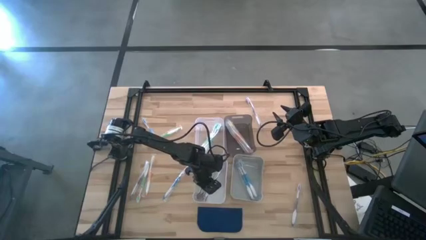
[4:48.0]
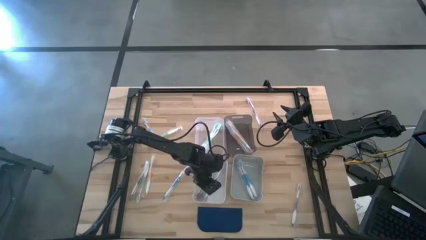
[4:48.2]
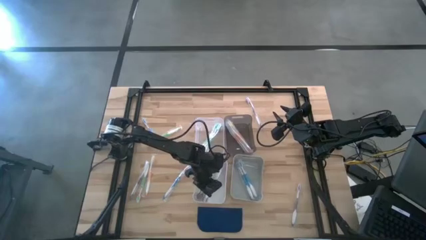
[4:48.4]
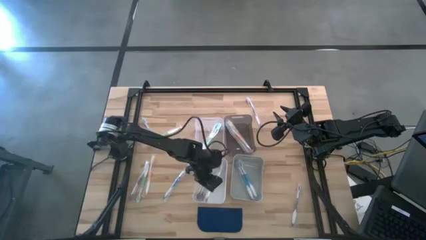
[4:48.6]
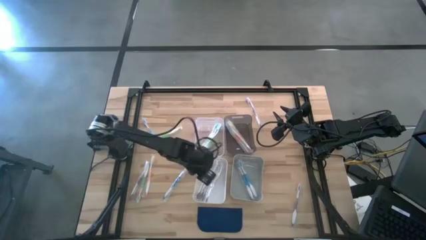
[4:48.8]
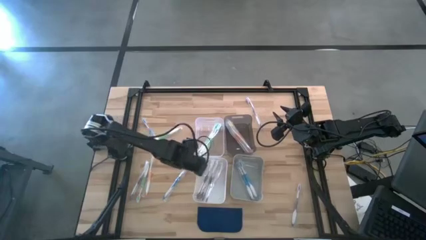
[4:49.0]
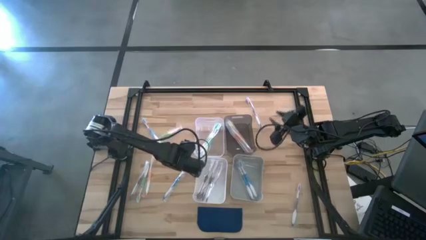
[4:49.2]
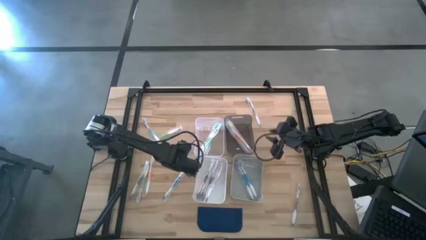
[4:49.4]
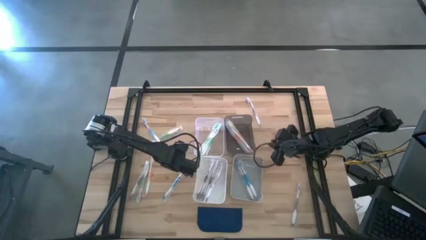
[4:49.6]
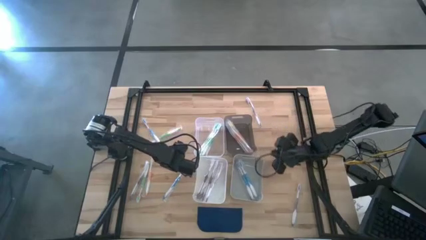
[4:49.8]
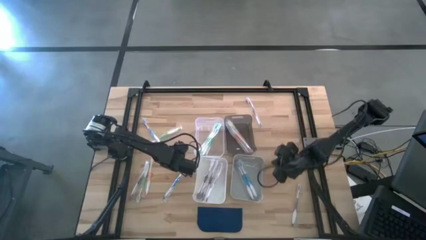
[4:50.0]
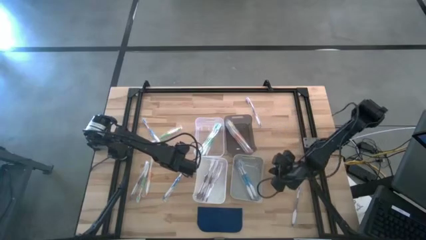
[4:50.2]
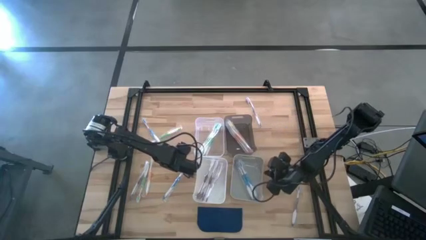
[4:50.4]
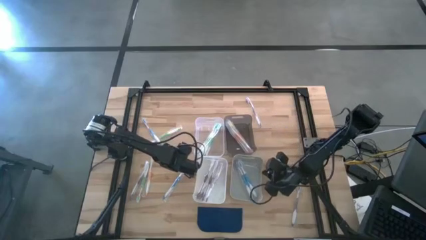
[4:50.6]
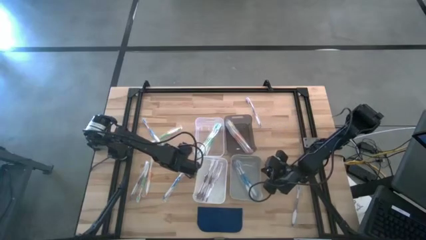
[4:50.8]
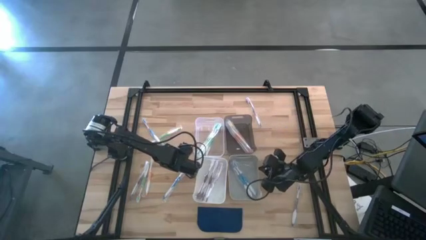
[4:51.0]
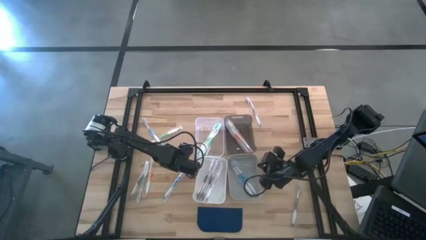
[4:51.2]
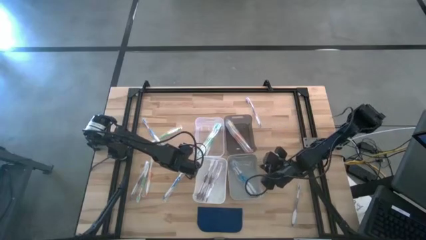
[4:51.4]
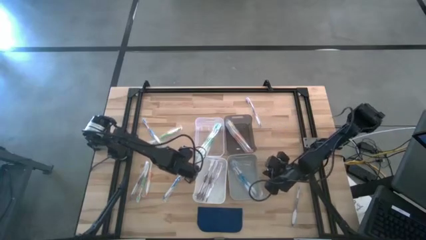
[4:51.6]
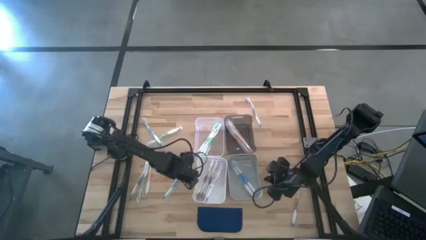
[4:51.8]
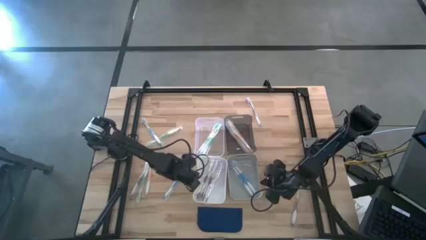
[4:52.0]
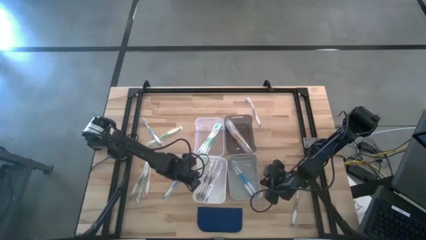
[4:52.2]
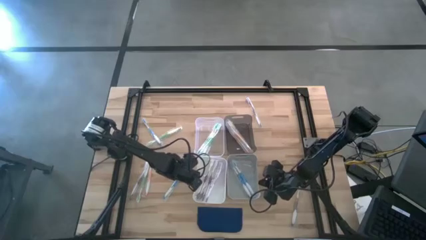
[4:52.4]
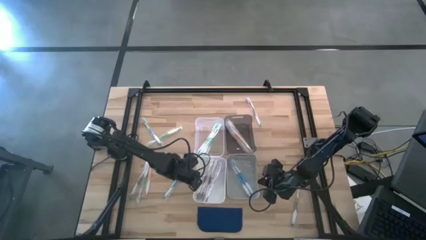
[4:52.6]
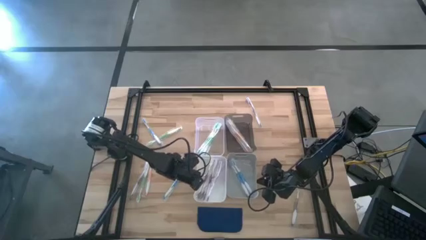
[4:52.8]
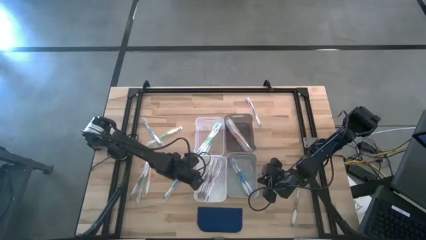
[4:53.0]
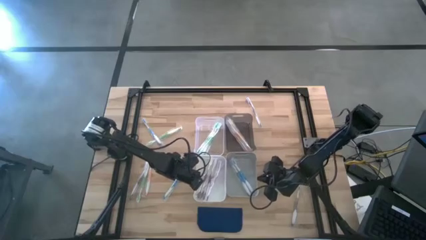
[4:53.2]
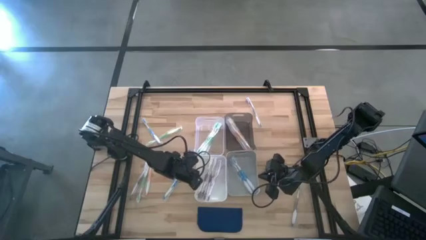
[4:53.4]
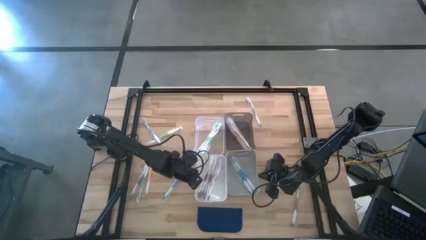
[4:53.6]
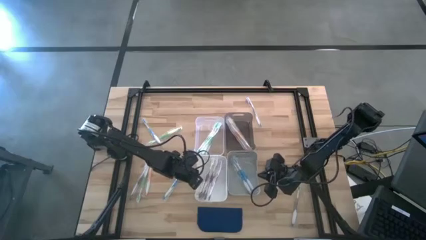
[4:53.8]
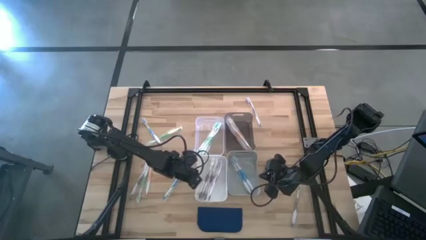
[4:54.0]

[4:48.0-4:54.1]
Task: Pick & Place Toothbrushes
Adjust the bins

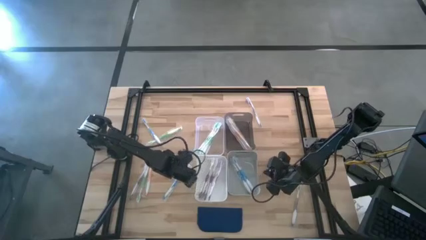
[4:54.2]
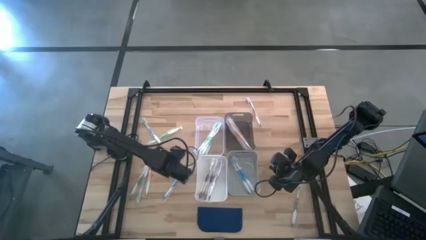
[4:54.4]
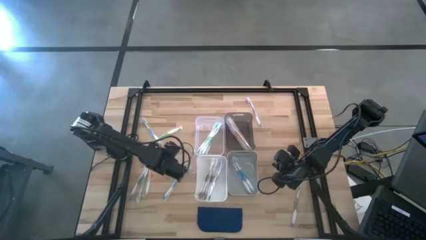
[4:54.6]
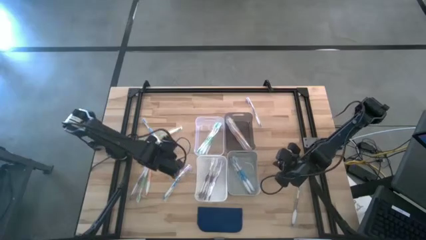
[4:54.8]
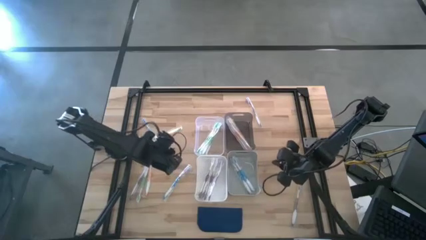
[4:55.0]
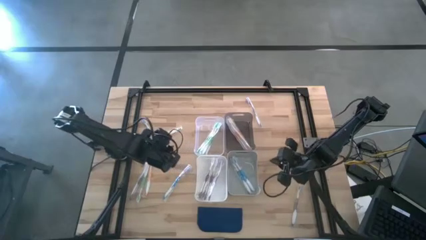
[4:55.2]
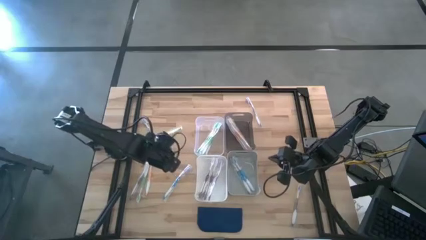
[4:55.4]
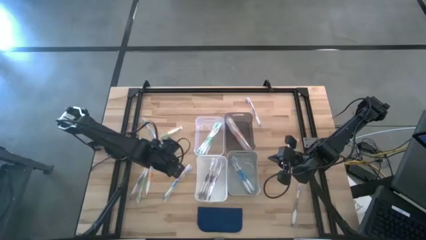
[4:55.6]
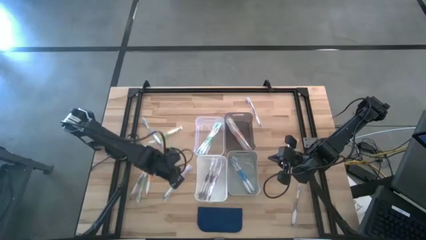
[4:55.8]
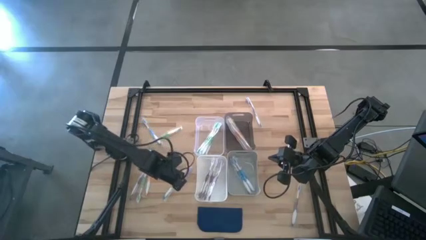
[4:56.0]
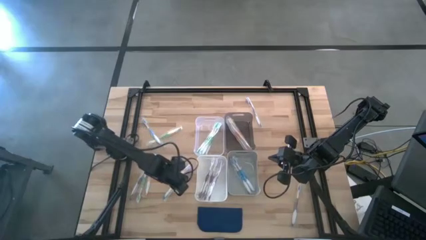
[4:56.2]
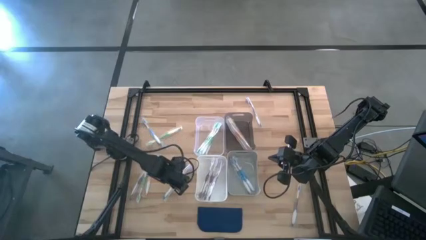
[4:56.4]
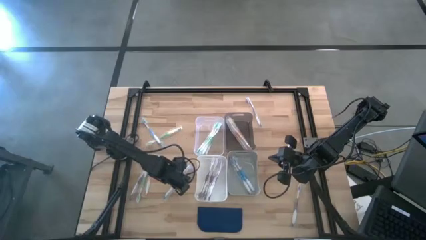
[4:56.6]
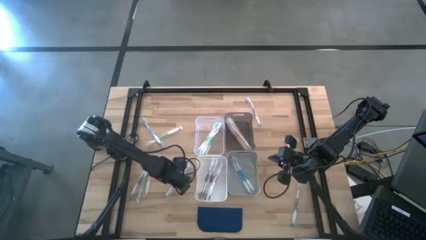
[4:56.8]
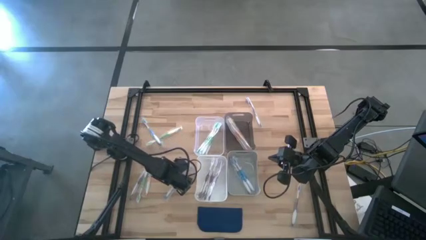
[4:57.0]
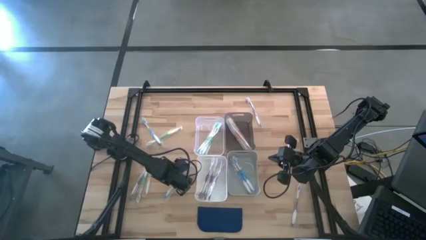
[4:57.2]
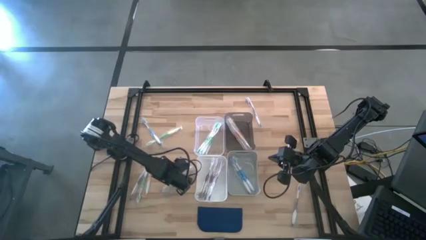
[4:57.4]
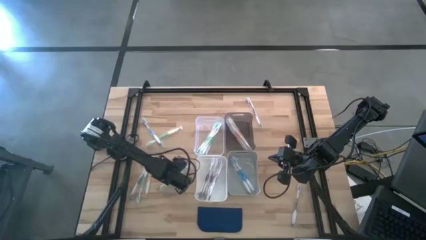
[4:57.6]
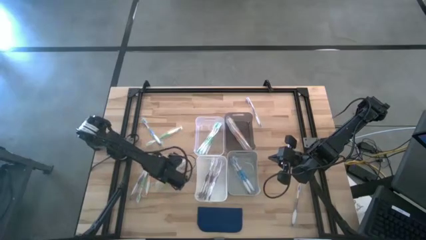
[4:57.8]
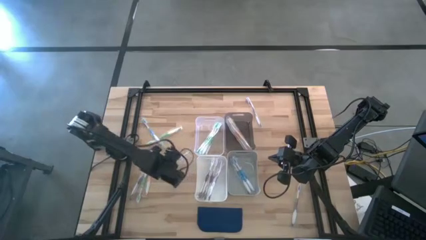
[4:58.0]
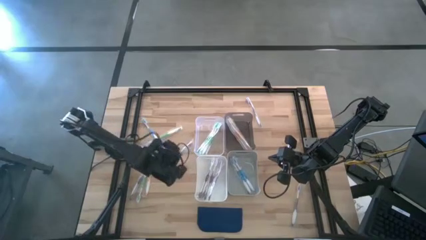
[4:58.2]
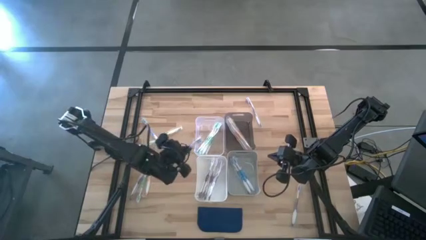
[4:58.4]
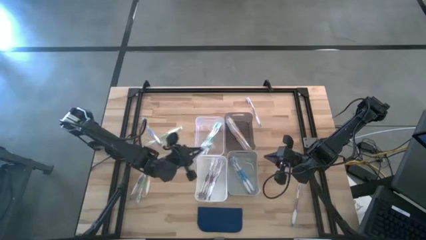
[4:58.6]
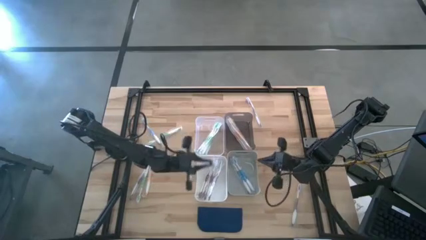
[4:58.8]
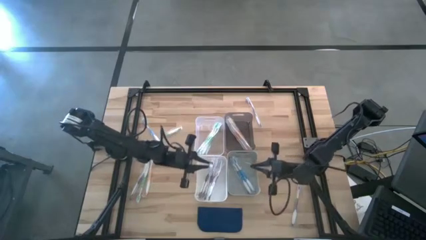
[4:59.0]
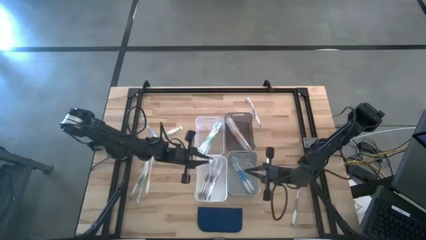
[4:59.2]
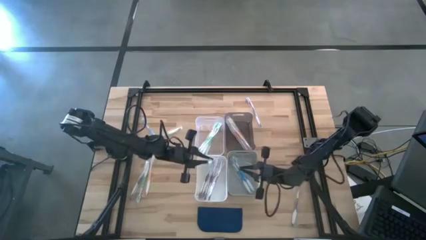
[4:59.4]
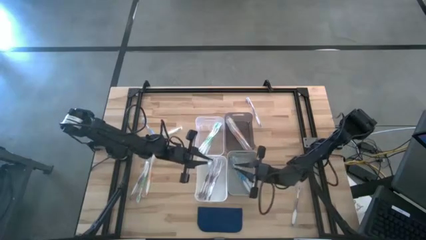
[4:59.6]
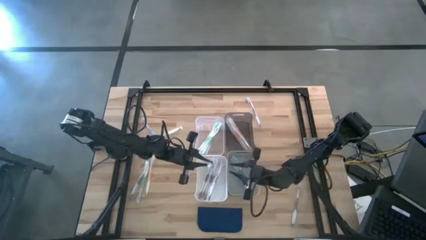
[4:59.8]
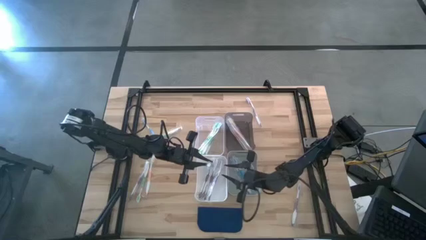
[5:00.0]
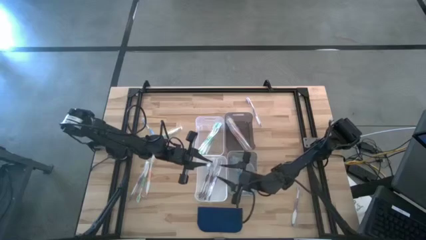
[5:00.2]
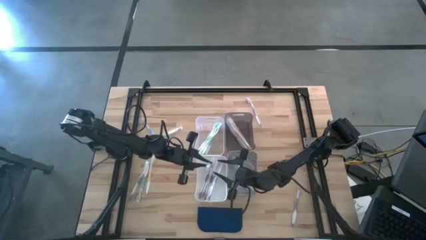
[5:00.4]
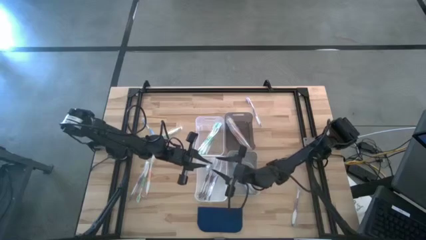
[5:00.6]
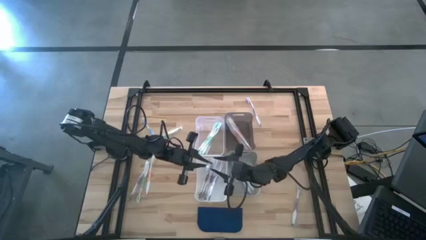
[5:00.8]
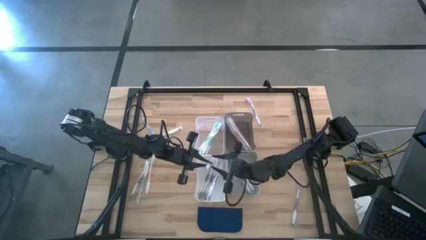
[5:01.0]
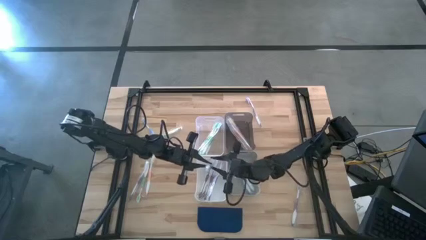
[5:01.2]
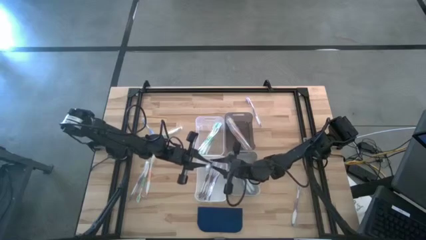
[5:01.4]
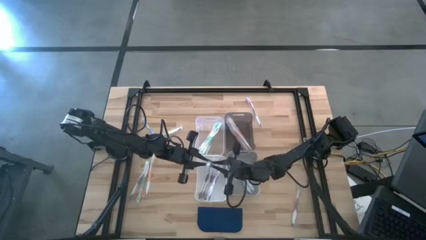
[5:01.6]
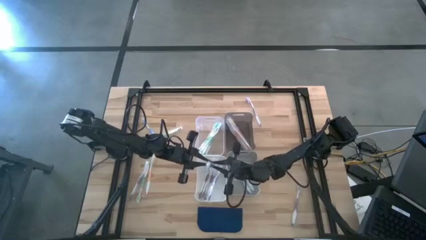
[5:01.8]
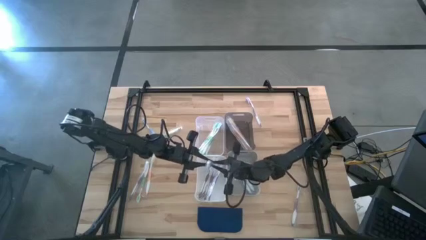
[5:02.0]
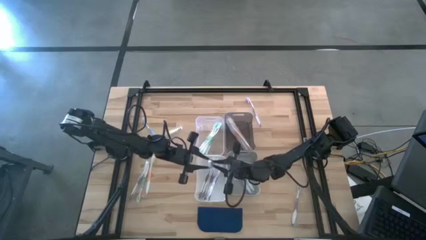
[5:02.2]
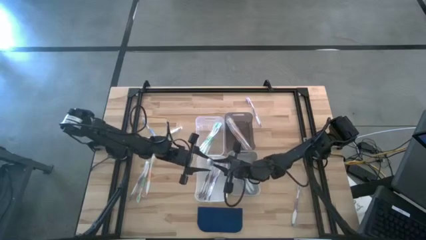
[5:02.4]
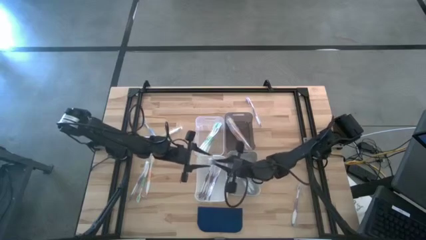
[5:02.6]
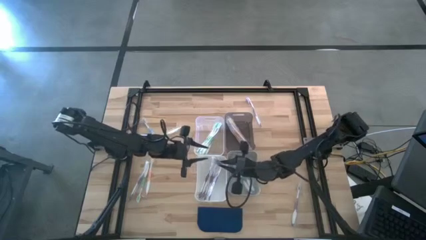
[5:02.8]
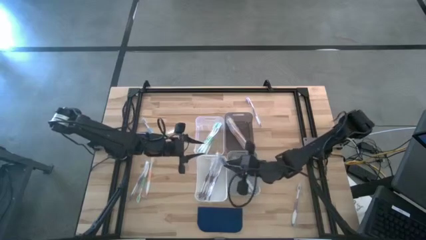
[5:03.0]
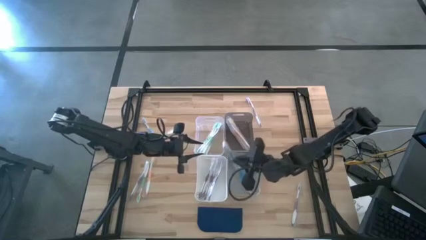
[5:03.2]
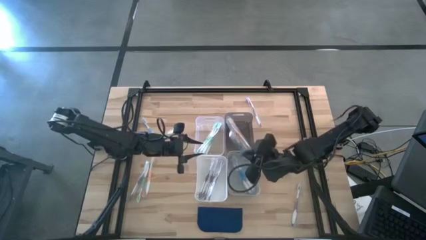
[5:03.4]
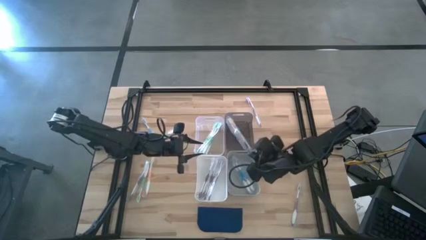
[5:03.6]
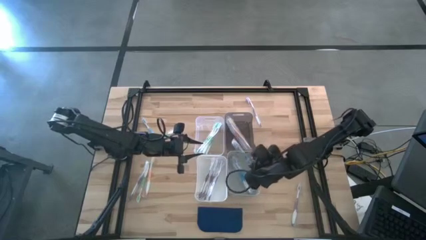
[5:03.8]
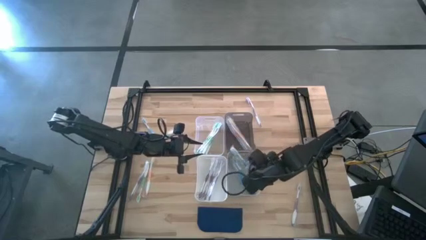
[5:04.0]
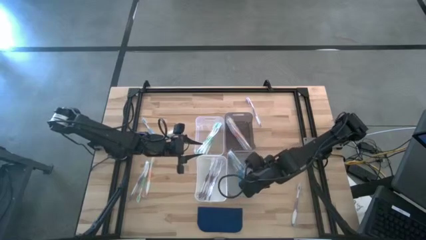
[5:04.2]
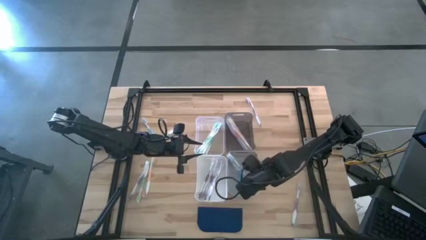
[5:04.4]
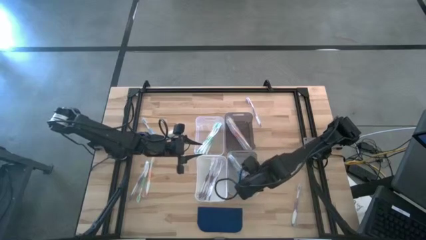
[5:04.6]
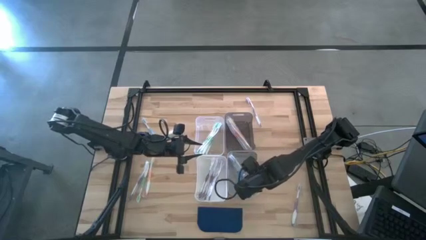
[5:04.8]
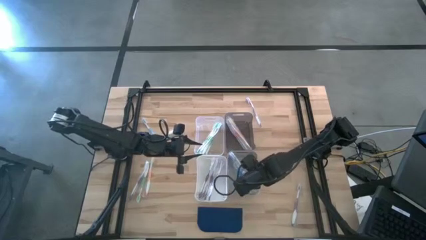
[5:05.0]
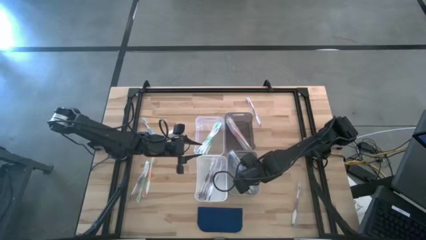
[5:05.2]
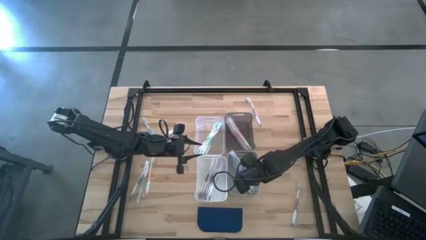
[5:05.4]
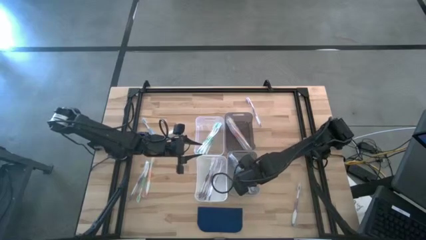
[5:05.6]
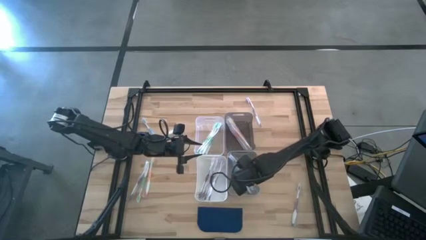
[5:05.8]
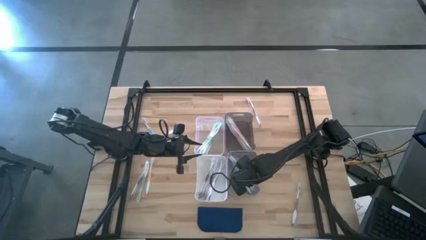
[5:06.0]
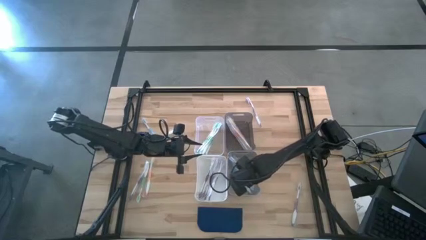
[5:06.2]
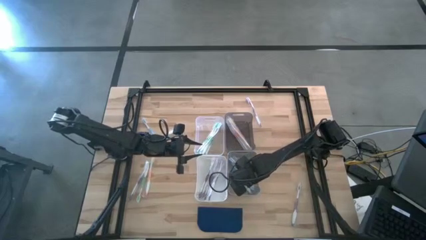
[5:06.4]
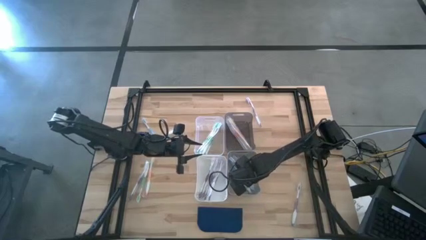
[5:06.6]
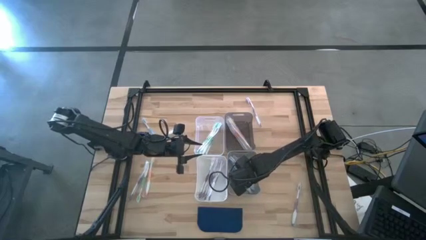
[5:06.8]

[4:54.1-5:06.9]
Put the blue toothbrush into the gray bin
